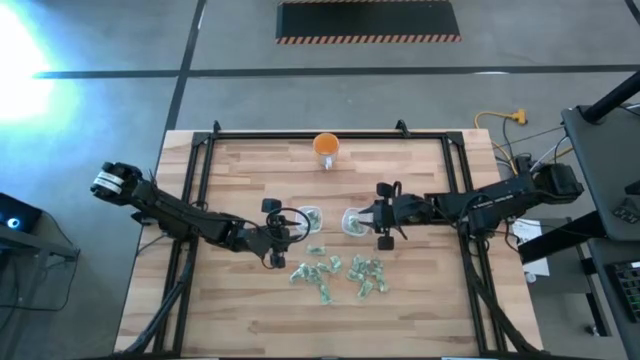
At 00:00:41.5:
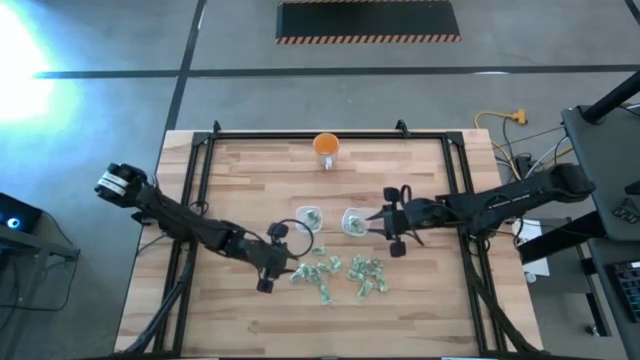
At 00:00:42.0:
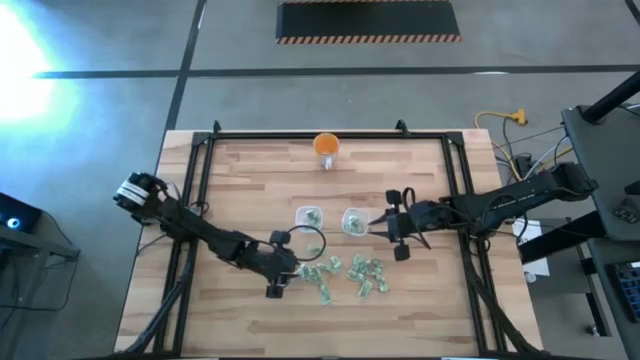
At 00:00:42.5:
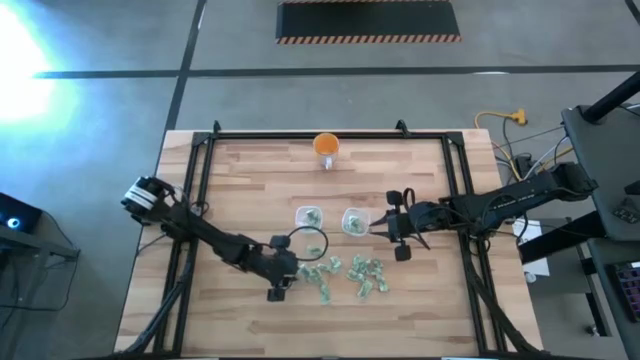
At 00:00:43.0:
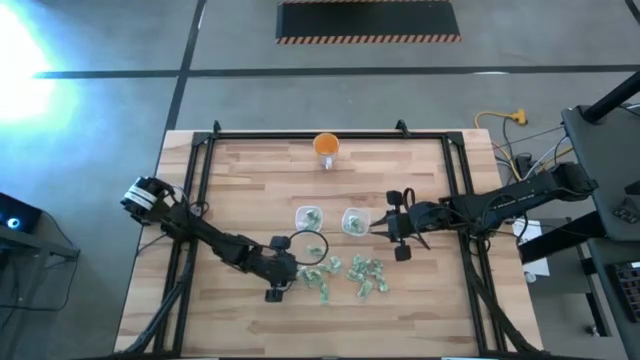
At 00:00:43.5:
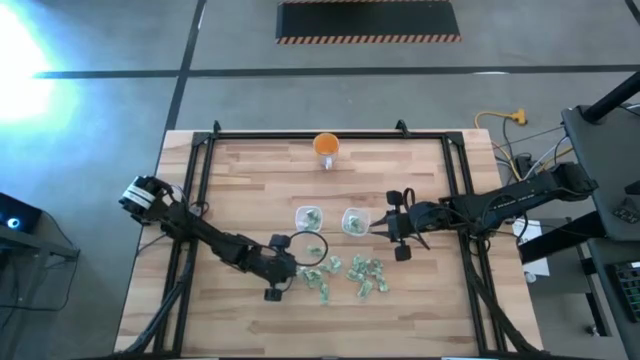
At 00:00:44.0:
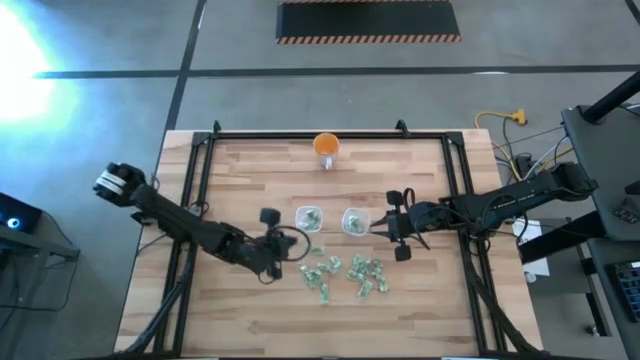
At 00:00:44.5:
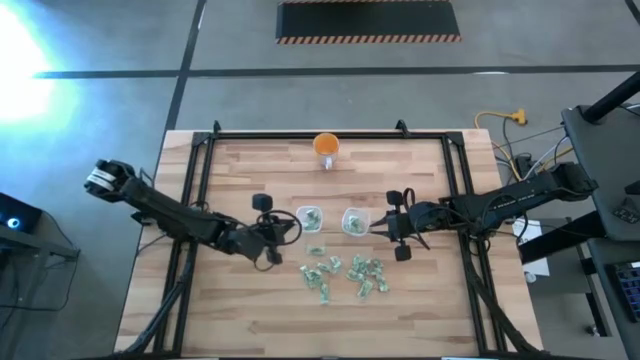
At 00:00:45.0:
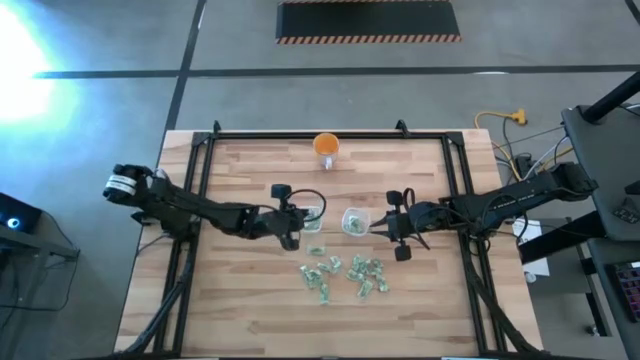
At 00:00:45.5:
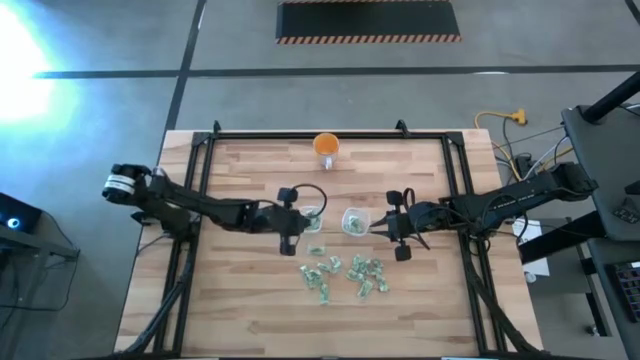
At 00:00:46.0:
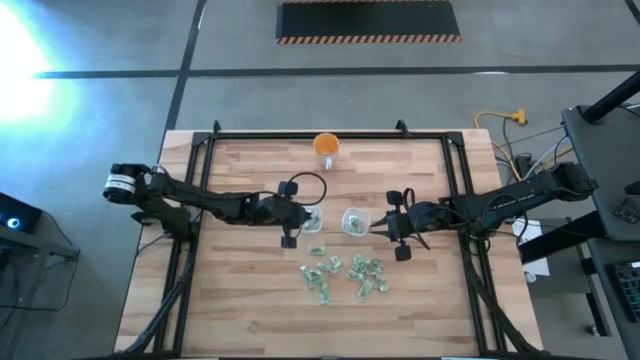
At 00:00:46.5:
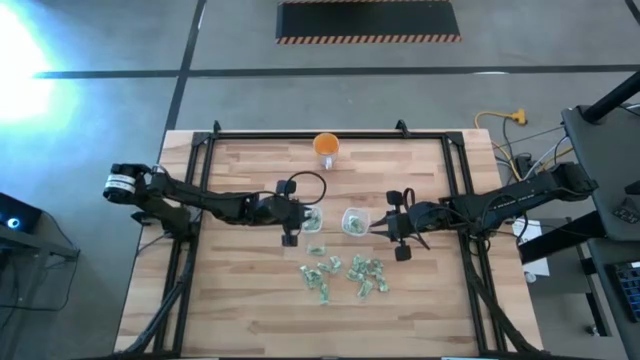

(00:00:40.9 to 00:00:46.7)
Task: Pick and place Stevia / Truvia into bins
Put the green stevia packet into the left transparent container

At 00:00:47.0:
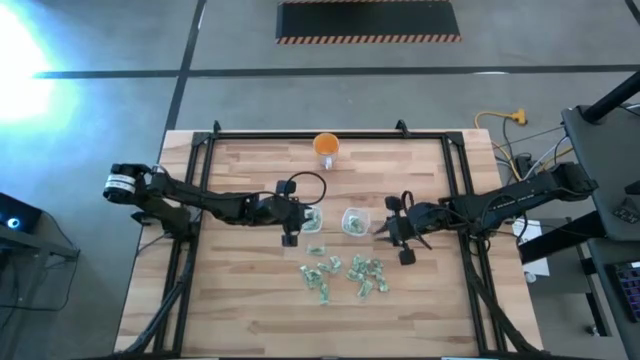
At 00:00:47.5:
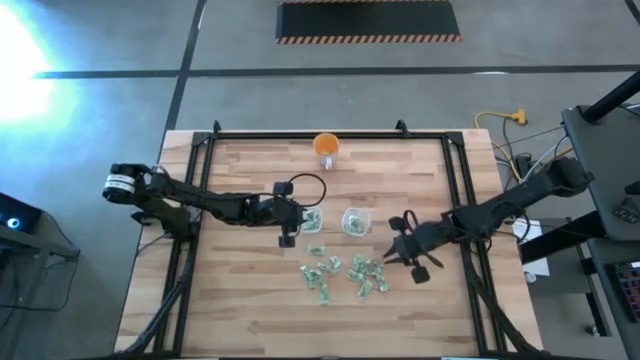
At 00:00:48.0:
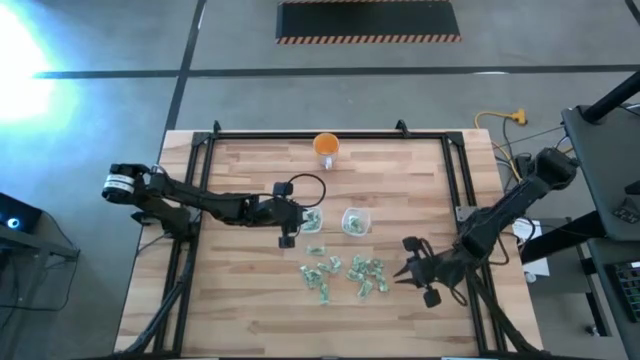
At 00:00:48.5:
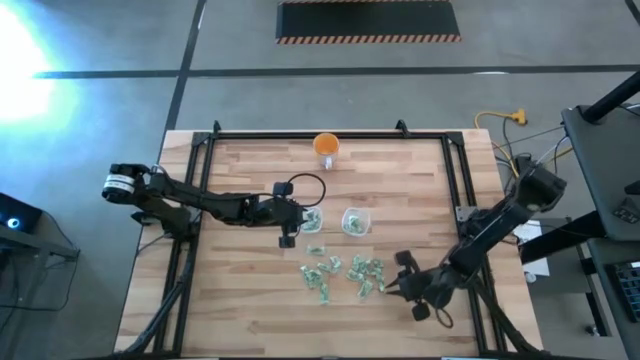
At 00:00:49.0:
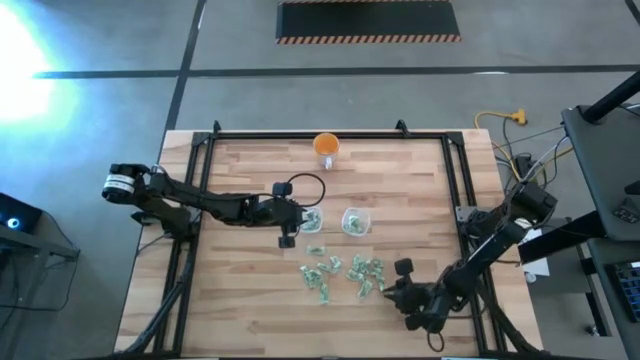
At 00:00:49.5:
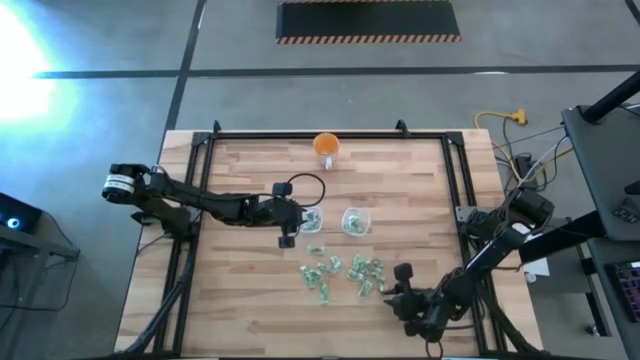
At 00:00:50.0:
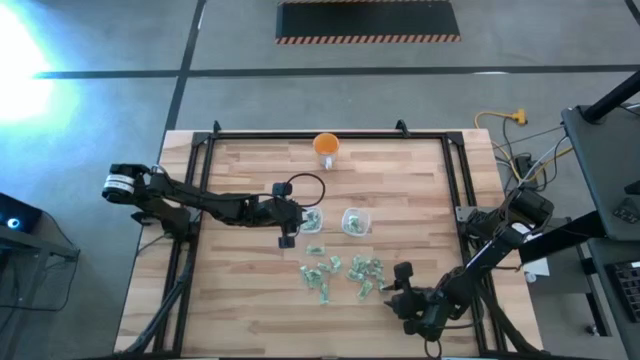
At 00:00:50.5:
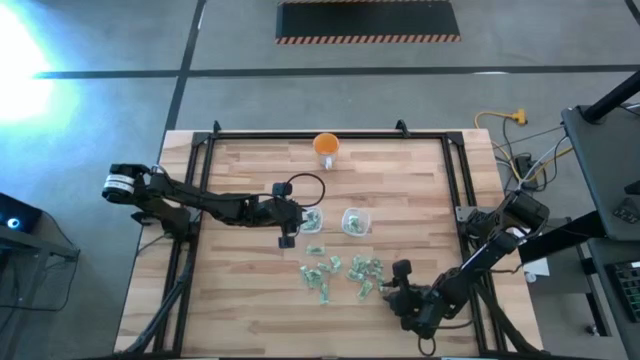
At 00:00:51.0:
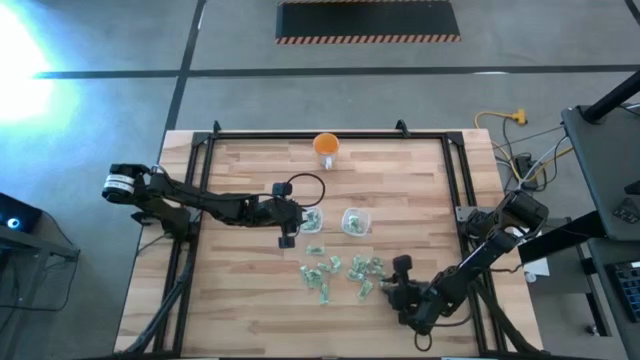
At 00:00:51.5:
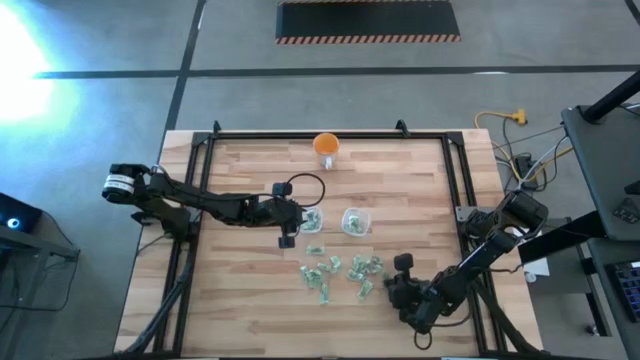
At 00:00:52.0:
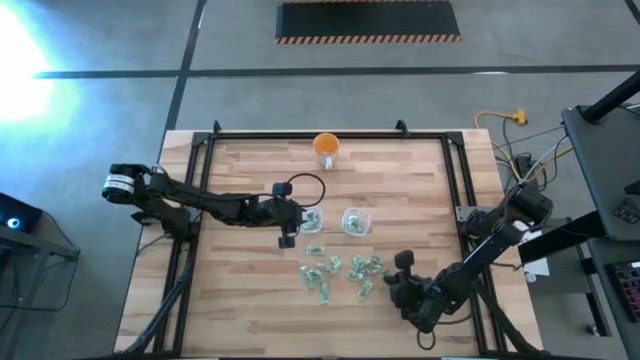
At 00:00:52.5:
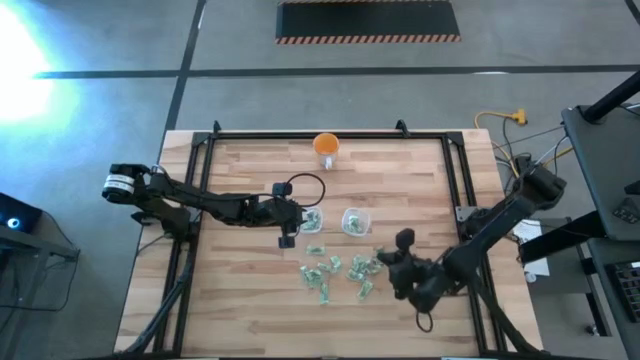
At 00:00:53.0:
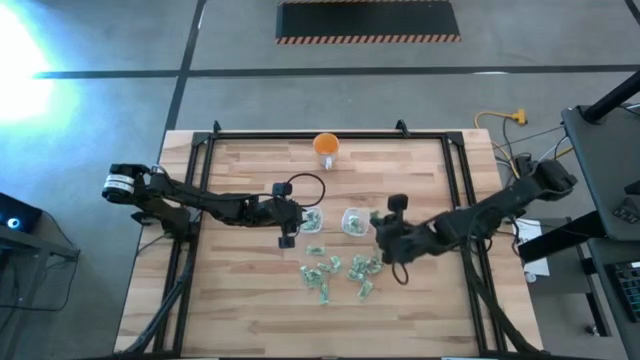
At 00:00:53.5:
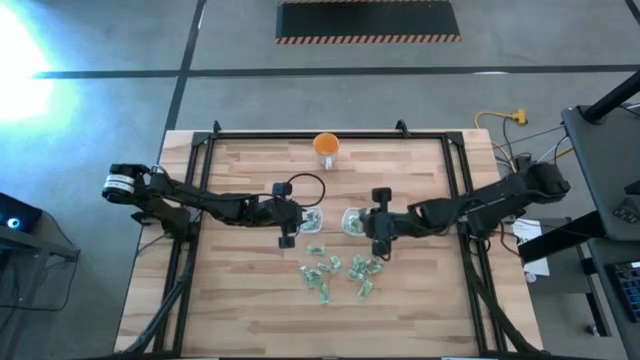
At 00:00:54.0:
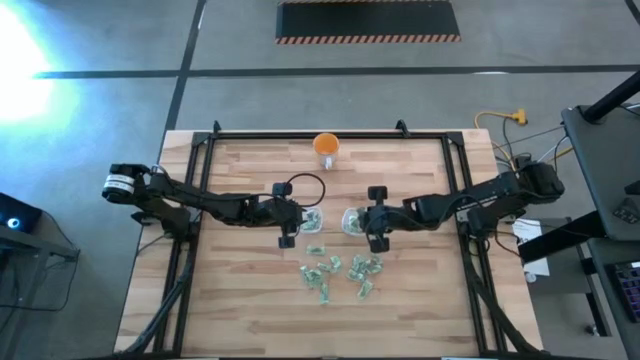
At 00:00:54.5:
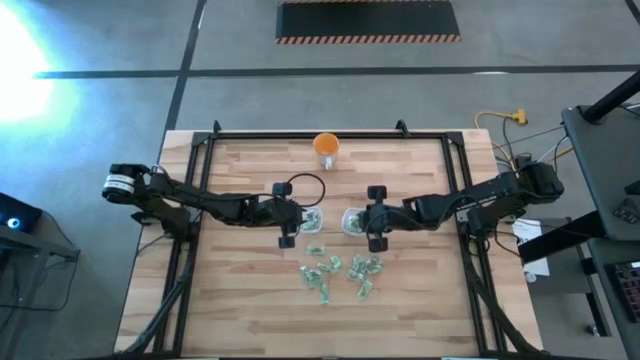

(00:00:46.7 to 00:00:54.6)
Put the green stevia packet into the right transparent container

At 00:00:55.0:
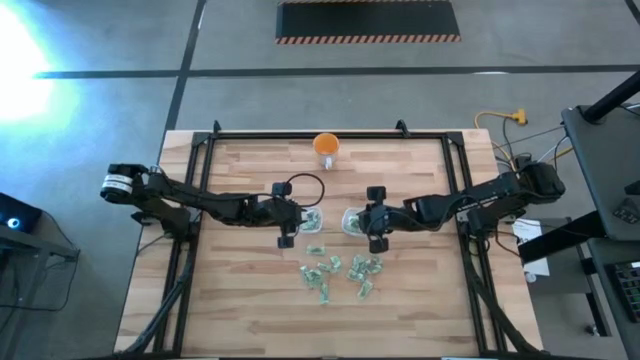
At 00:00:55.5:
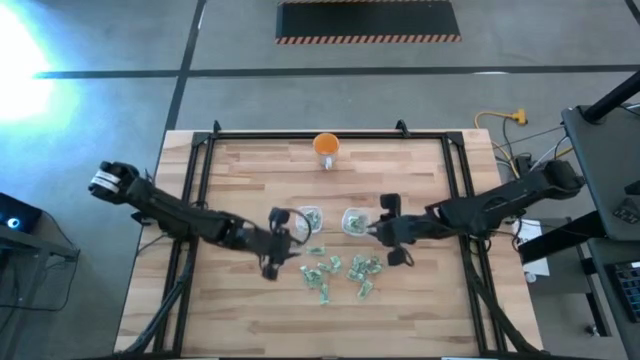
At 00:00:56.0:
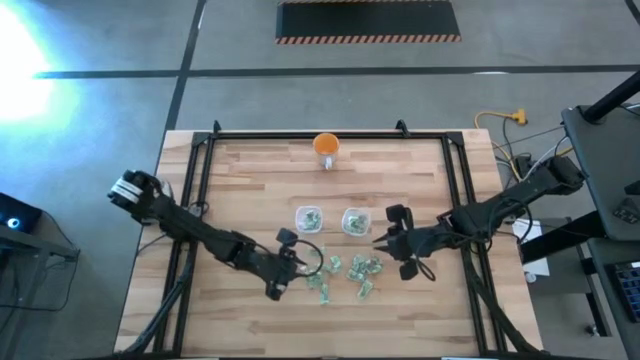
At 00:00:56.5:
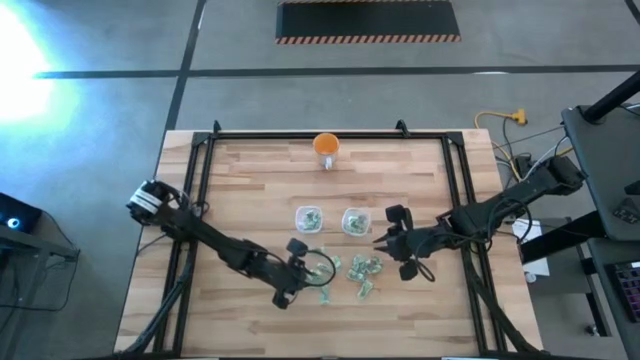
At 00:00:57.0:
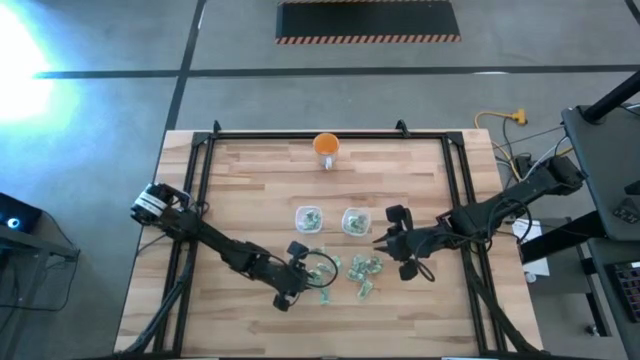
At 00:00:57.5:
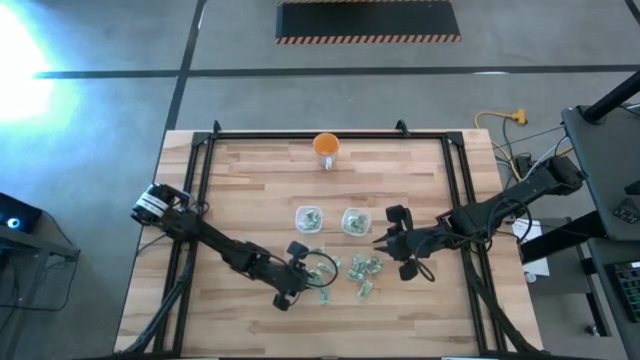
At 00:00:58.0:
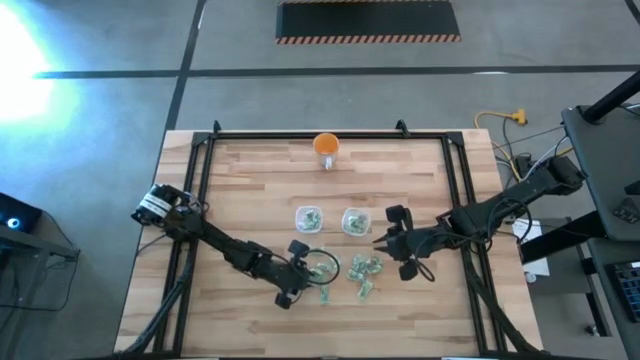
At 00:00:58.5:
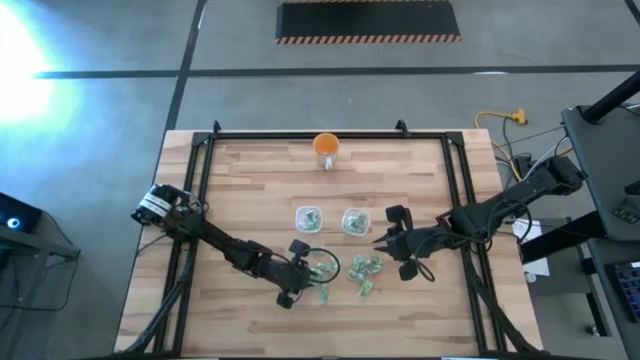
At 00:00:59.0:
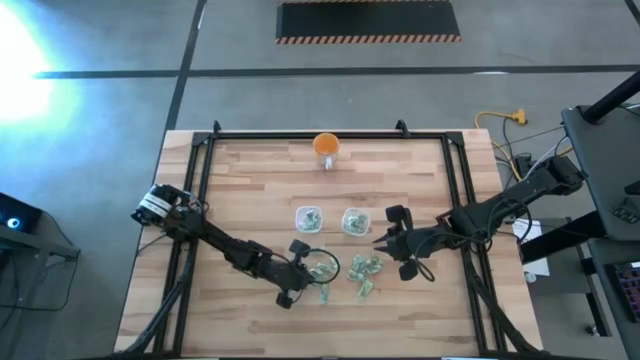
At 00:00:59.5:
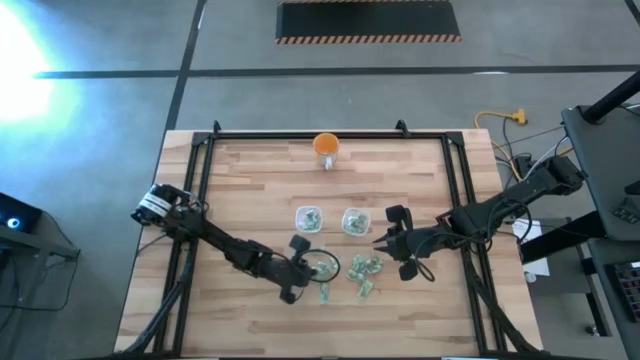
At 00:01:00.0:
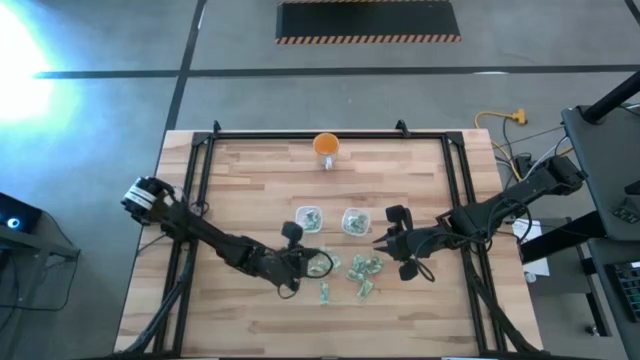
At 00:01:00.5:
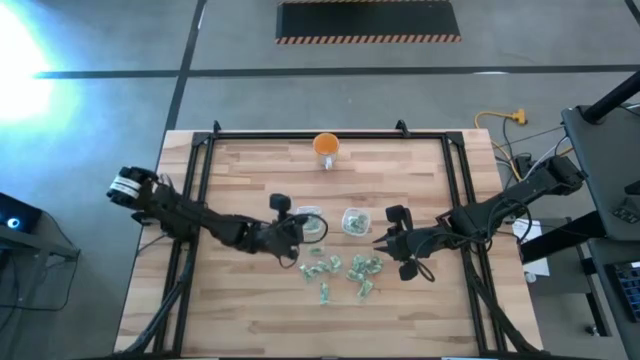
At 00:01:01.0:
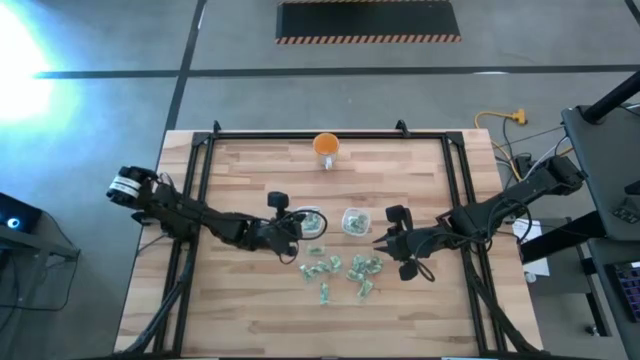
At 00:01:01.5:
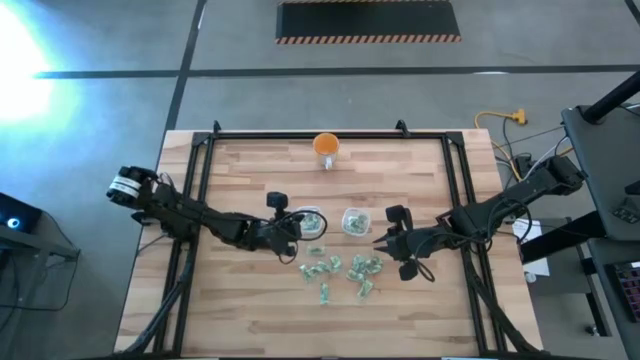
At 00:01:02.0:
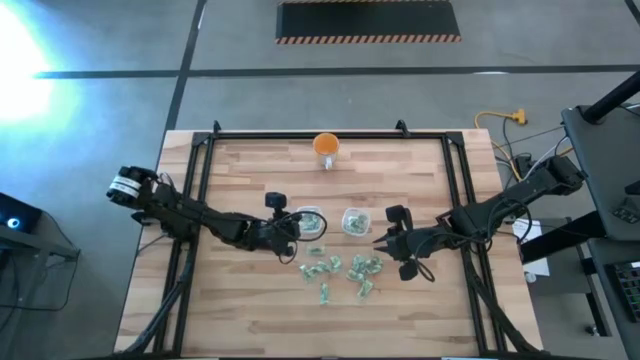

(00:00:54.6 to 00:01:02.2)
Put the green stevia packet into the left transparent container
